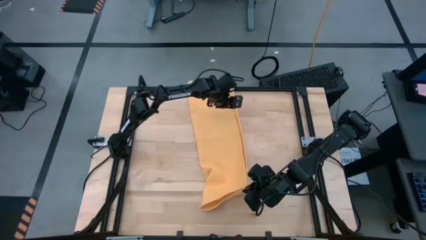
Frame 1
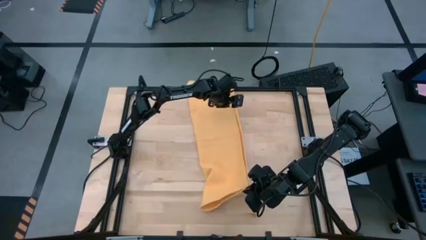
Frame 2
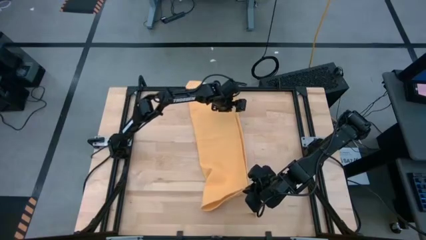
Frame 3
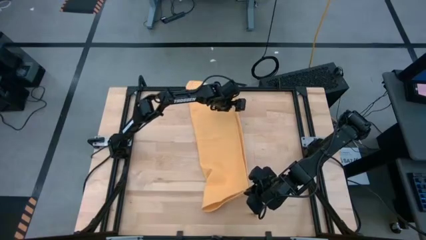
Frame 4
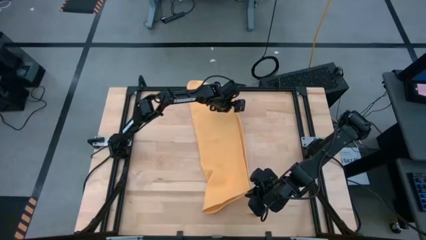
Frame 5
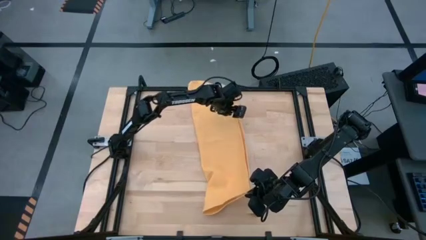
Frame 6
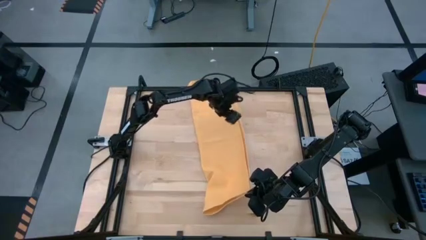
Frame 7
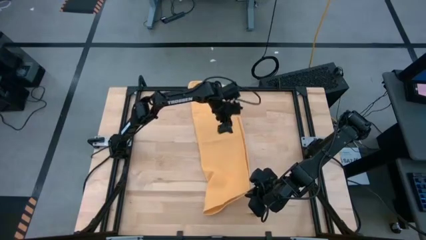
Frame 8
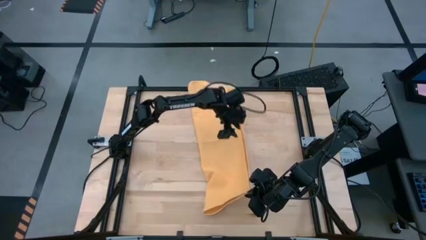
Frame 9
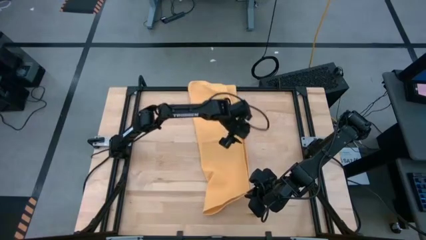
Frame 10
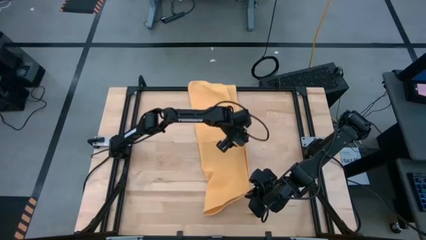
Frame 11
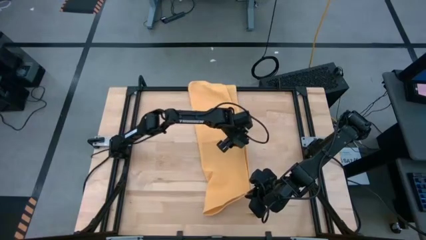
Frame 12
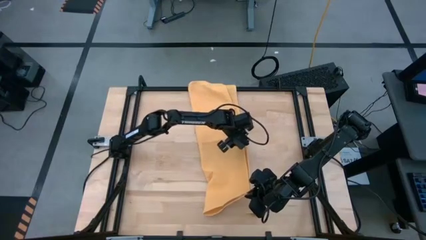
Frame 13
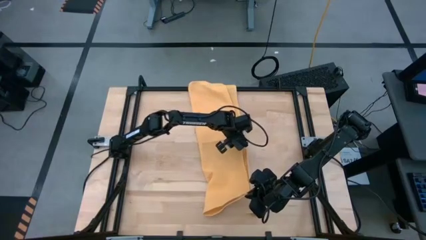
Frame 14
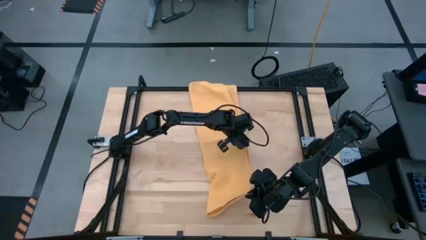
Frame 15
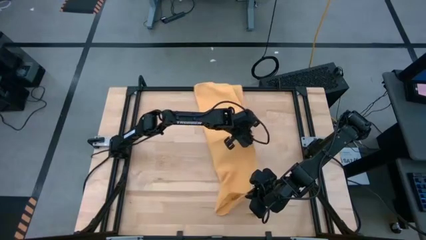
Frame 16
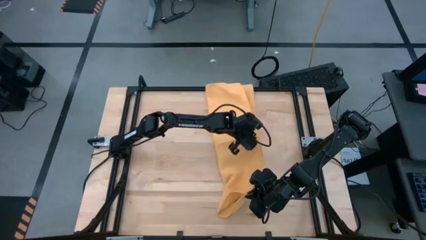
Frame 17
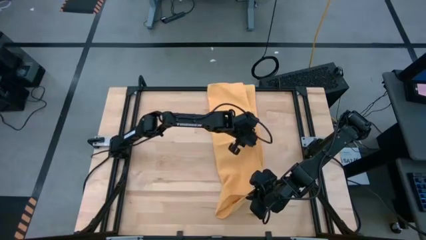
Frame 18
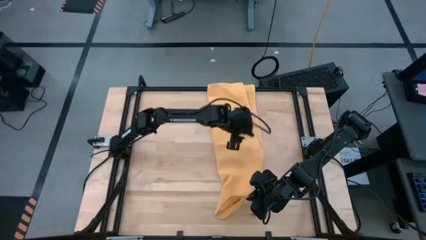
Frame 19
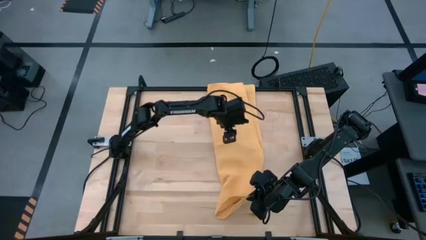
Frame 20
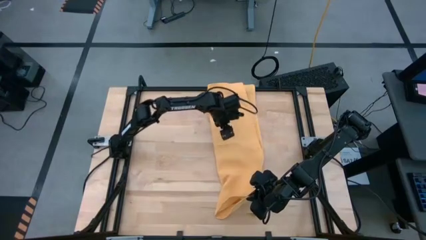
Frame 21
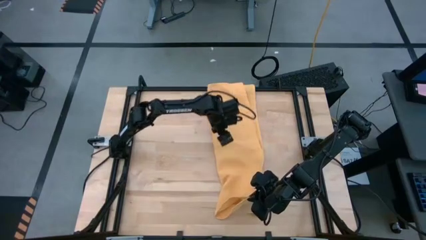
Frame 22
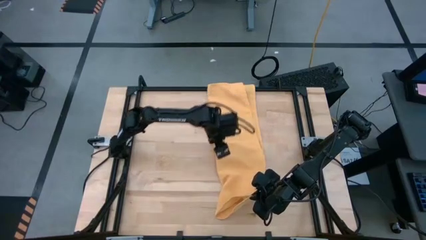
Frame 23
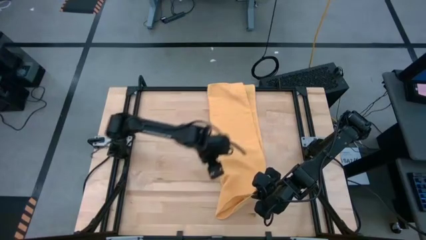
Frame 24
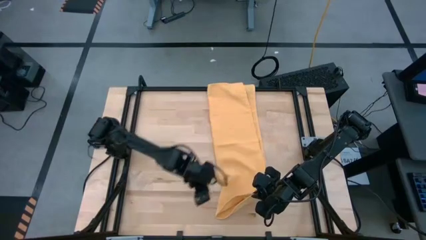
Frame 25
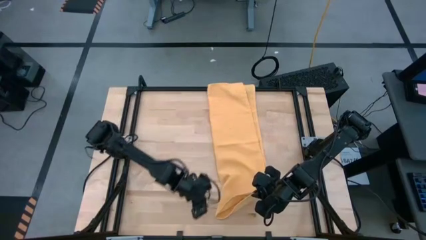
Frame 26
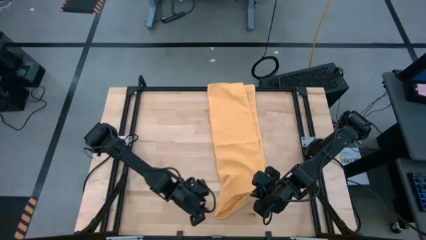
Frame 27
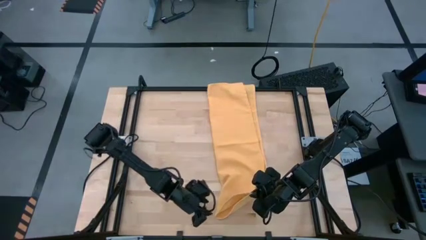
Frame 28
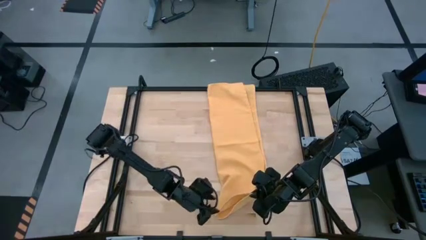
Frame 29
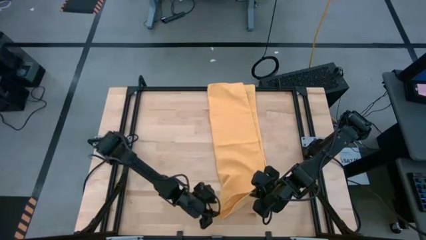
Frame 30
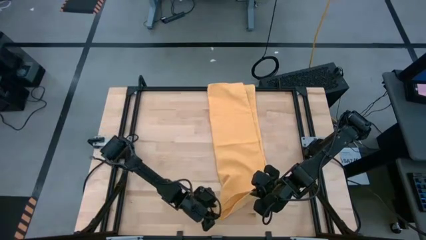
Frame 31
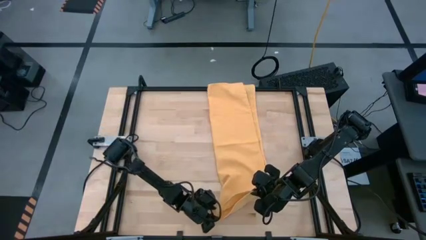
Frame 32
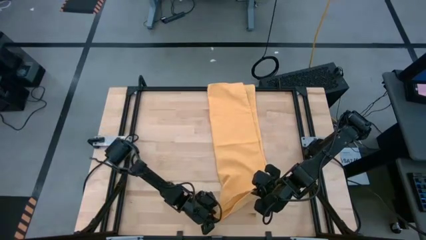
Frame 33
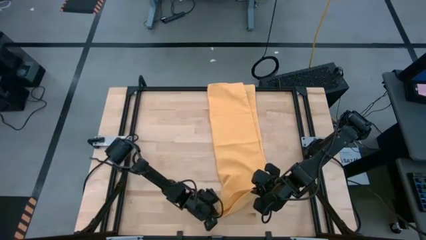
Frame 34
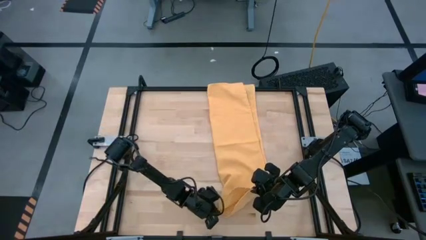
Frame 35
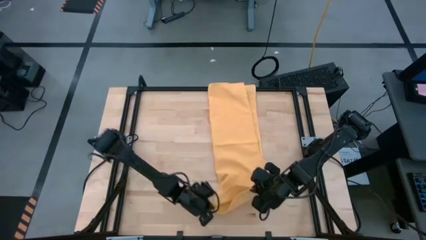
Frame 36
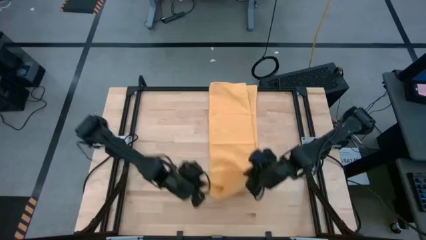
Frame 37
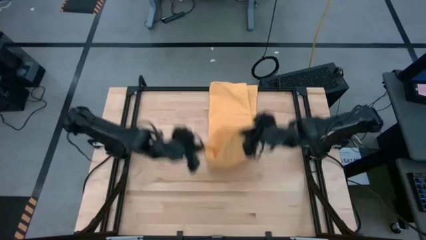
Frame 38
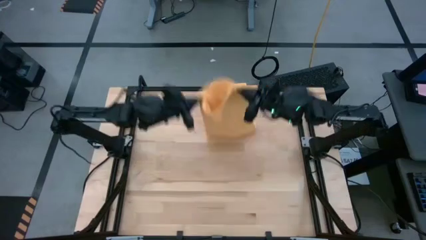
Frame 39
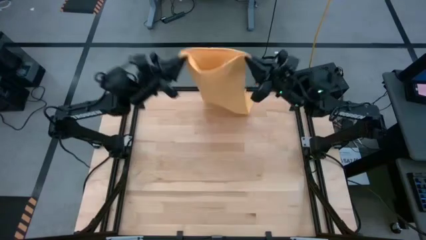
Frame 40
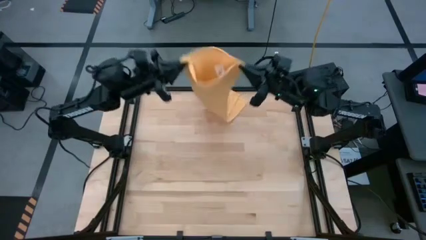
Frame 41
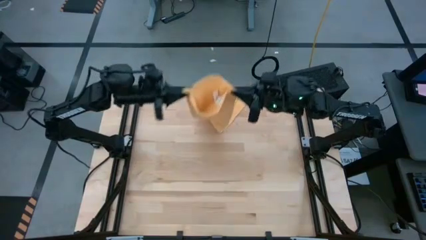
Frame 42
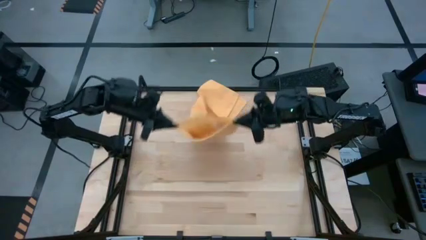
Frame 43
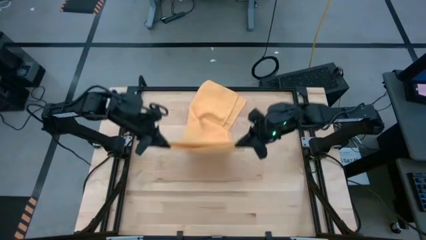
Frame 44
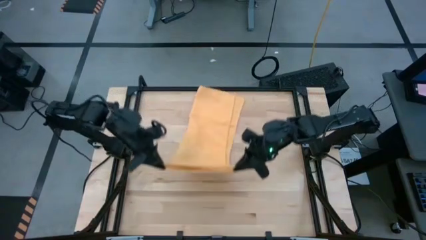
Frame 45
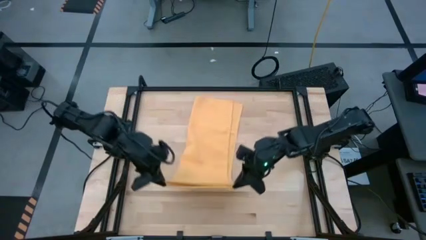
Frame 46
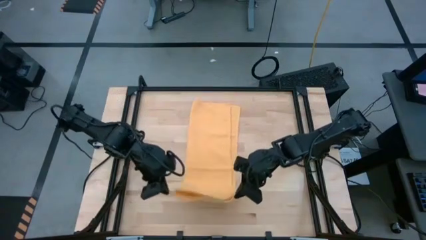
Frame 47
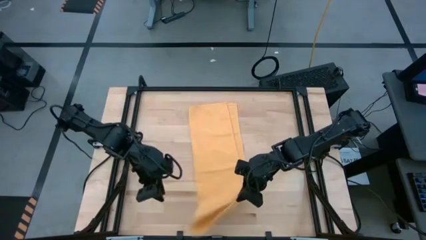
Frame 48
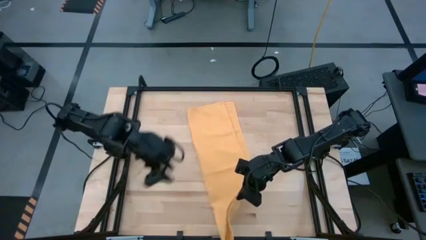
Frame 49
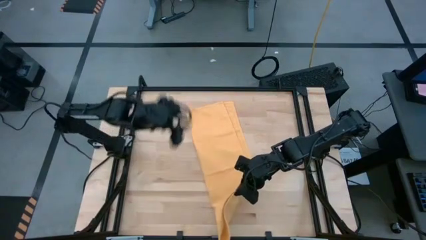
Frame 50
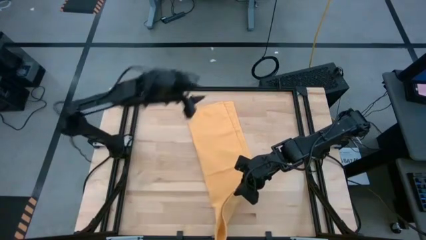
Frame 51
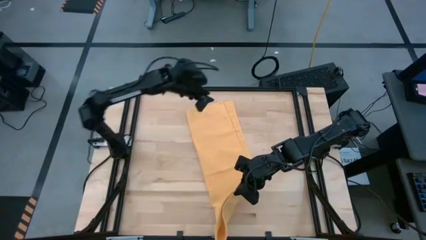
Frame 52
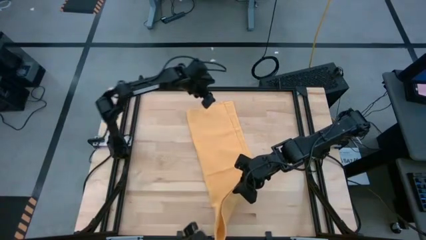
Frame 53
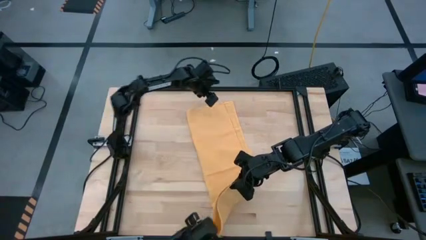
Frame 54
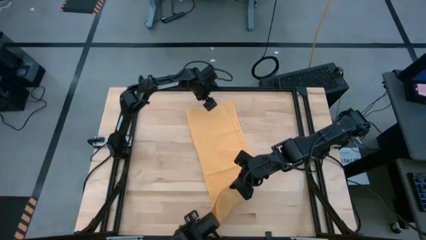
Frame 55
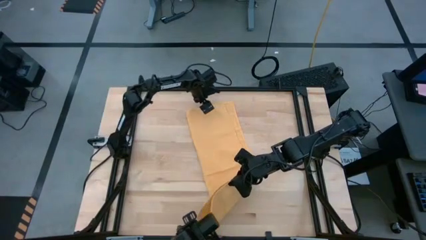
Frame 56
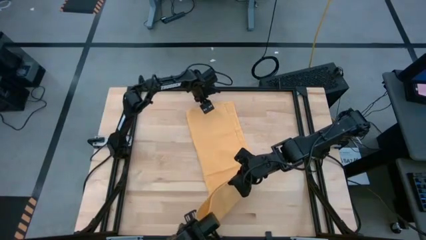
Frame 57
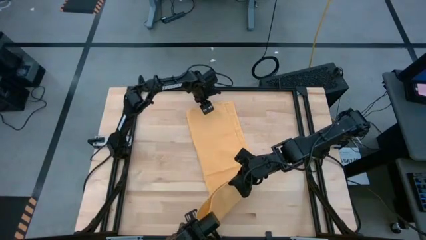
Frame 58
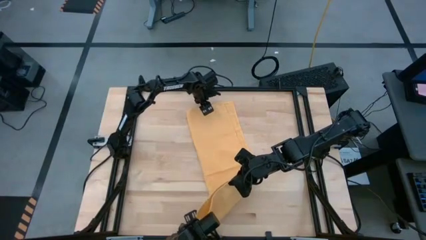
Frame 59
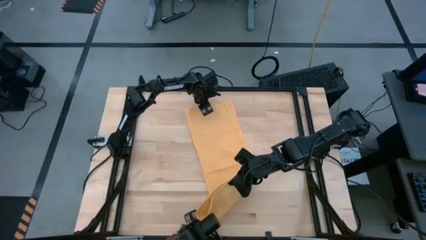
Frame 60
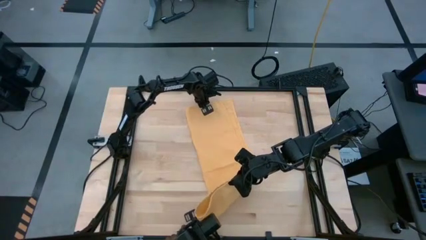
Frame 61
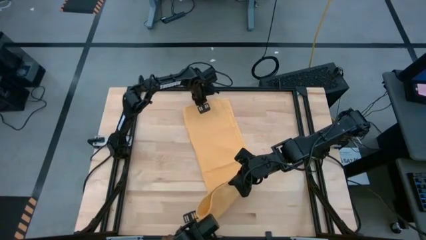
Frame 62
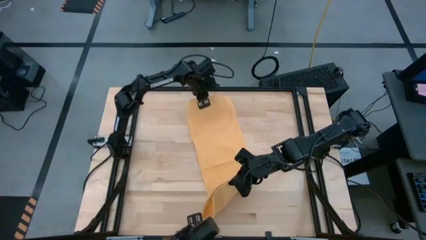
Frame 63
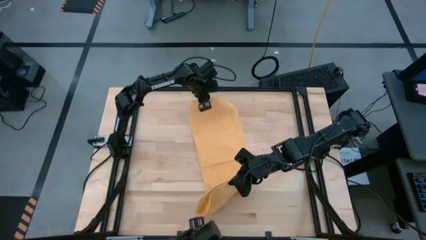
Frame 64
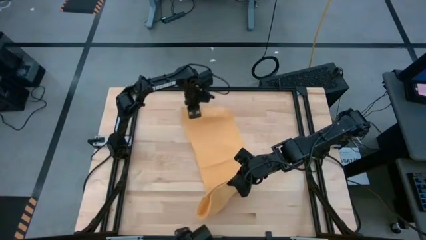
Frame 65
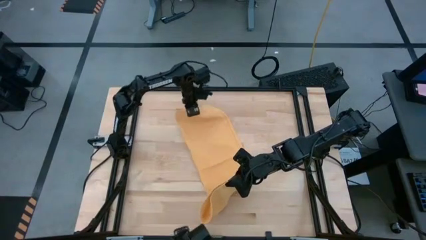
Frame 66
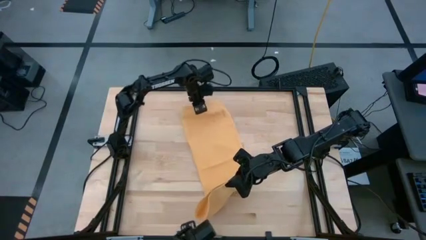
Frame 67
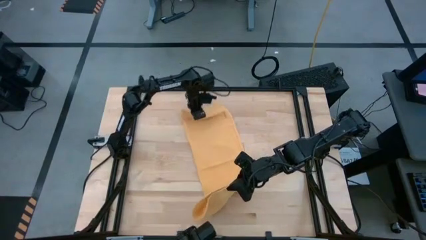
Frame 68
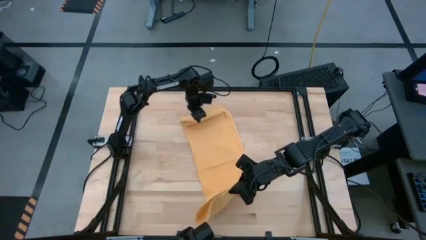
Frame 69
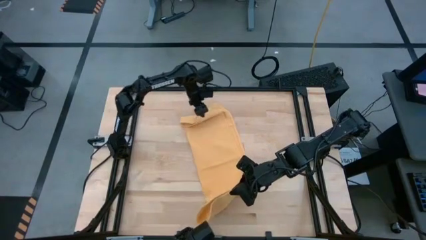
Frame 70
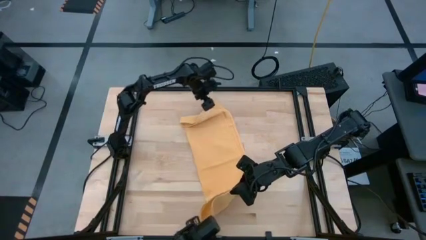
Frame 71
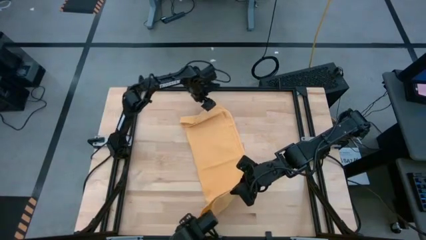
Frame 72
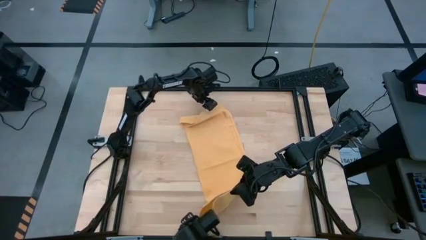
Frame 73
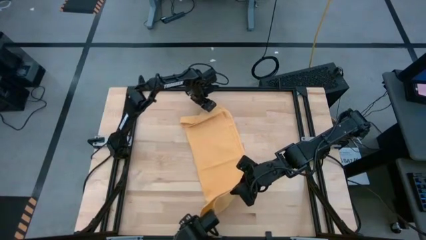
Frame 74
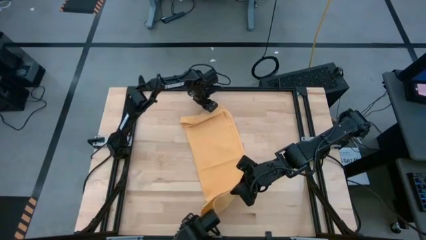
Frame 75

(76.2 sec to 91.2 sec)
Task: Roll towel
Roll the yellow towel

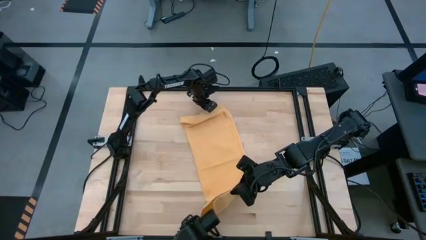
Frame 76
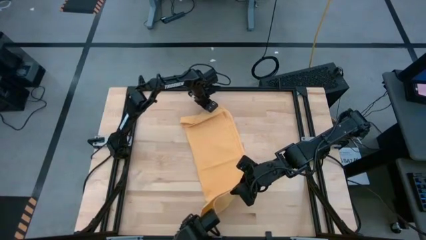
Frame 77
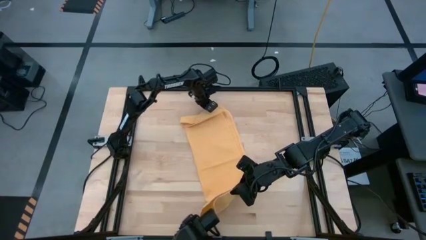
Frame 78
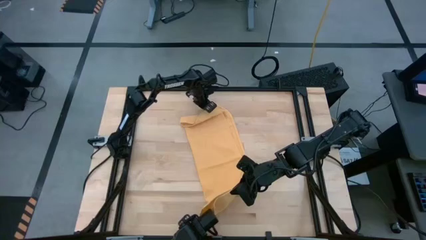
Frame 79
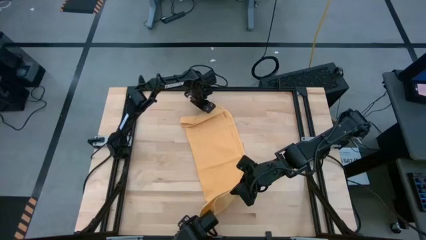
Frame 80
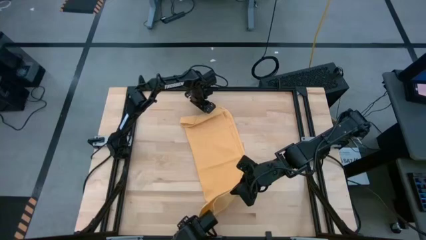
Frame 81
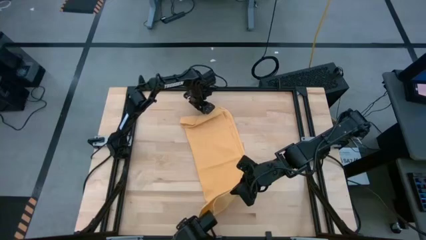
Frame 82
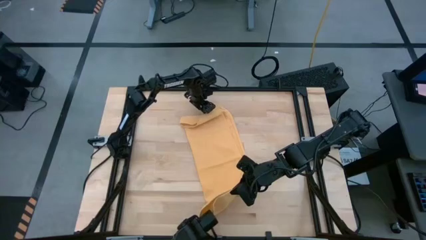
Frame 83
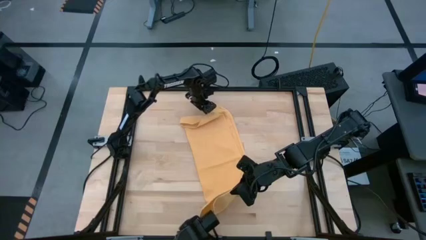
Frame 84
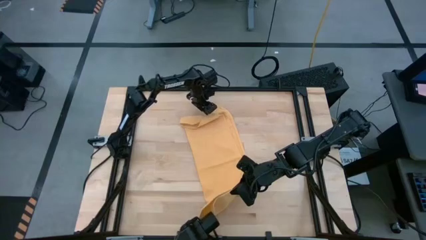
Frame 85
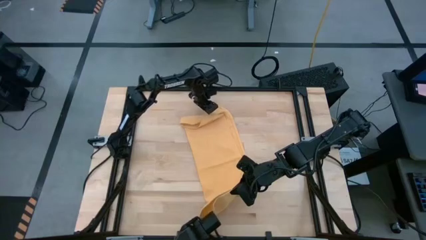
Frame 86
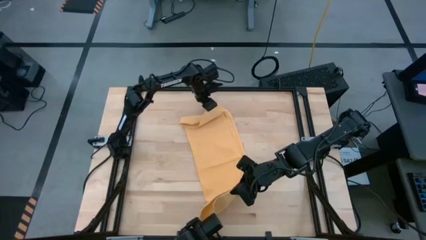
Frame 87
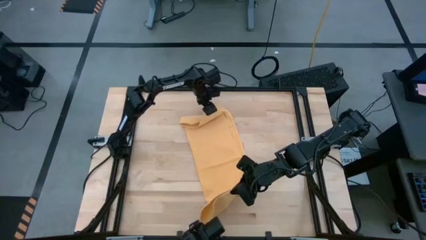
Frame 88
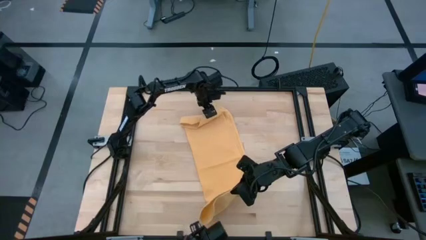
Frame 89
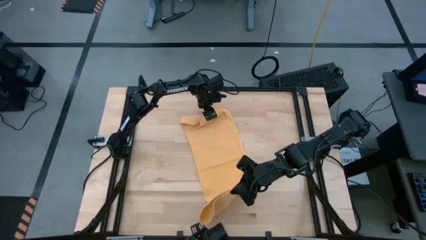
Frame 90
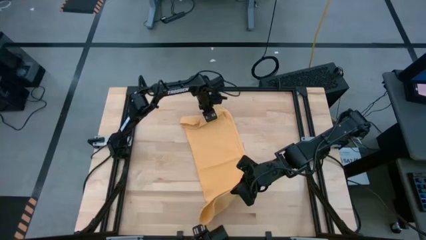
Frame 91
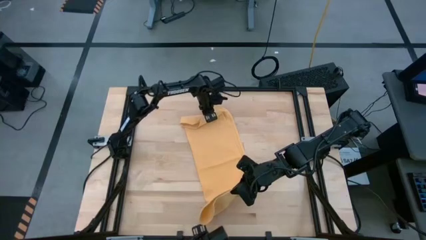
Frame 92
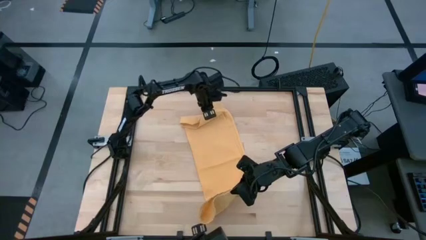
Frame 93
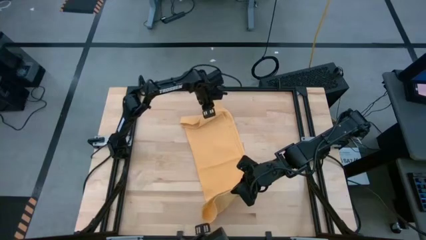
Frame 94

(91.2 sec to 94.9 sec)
Roll the yellow towel
